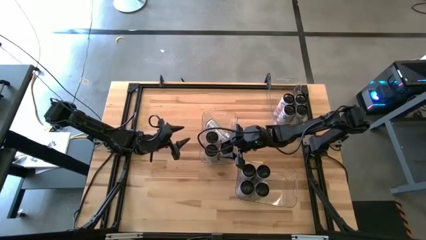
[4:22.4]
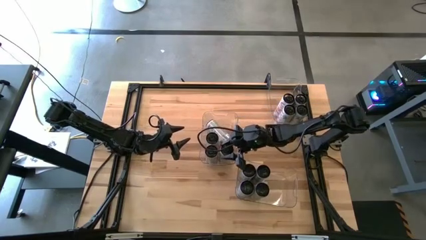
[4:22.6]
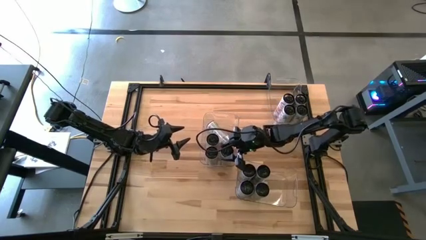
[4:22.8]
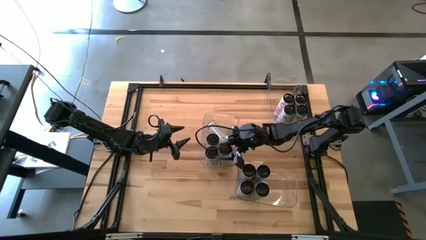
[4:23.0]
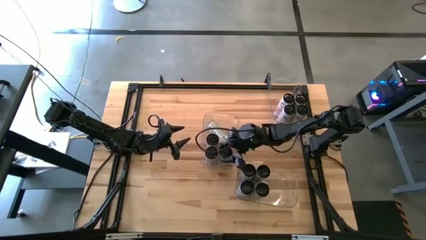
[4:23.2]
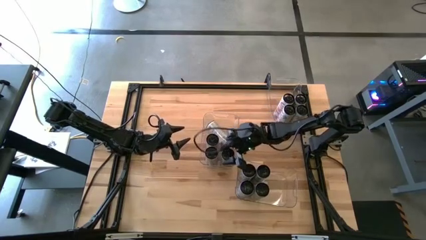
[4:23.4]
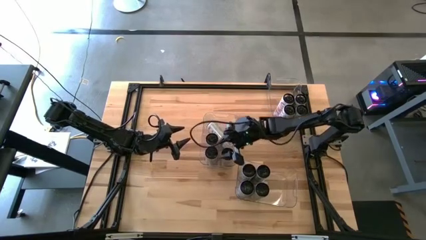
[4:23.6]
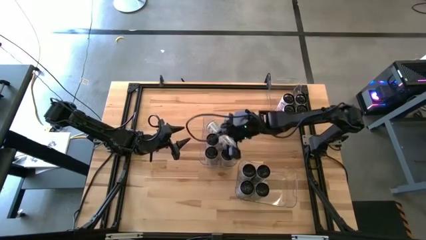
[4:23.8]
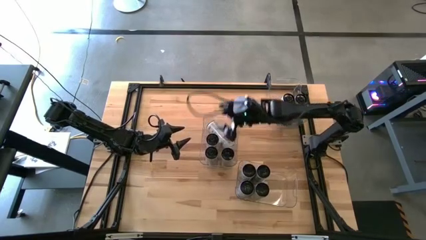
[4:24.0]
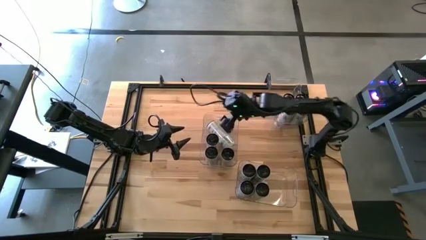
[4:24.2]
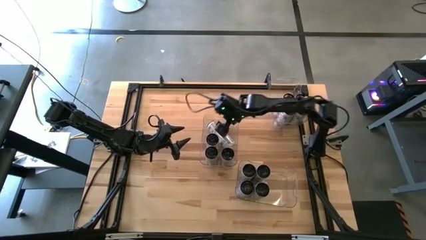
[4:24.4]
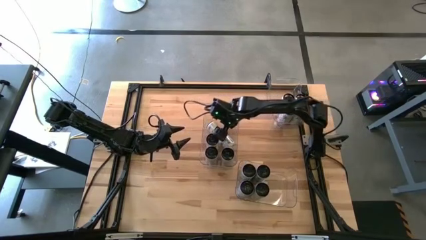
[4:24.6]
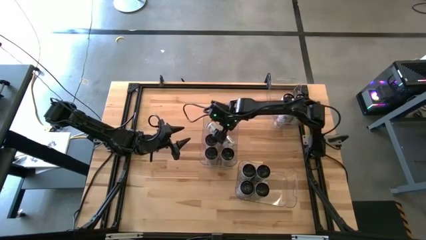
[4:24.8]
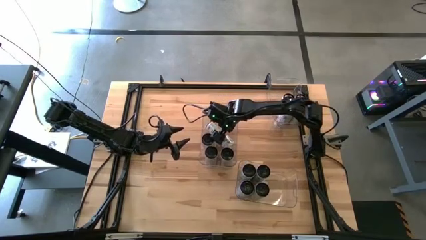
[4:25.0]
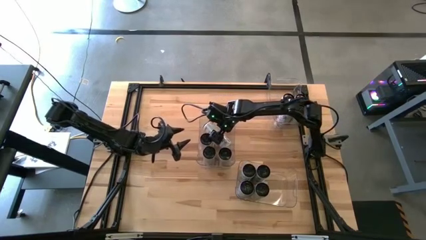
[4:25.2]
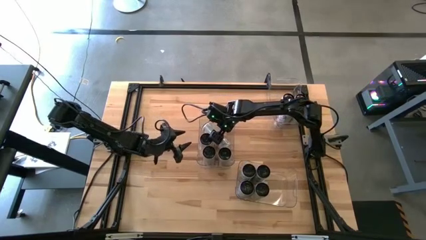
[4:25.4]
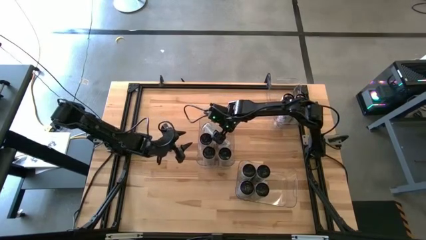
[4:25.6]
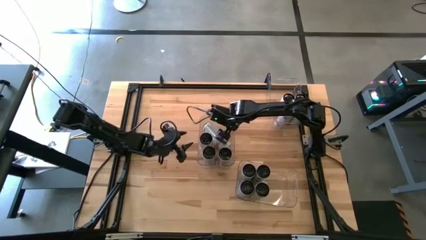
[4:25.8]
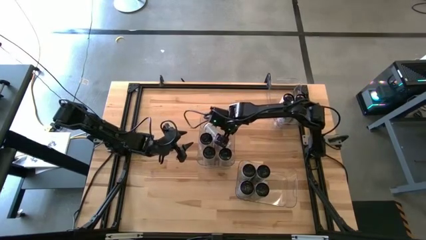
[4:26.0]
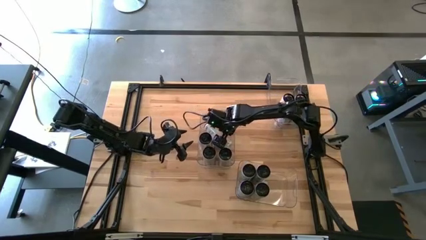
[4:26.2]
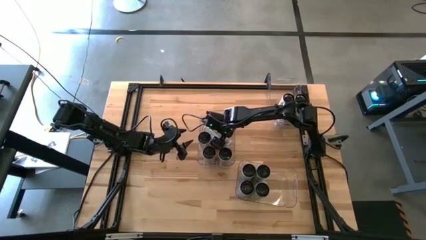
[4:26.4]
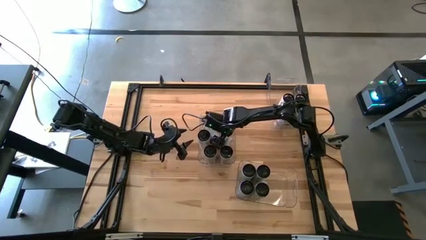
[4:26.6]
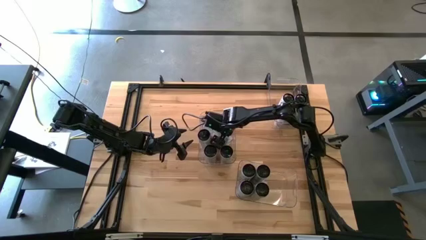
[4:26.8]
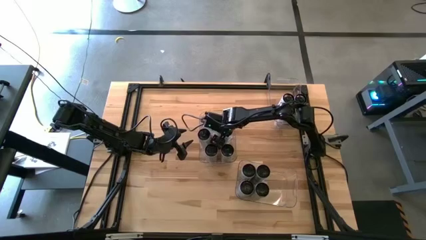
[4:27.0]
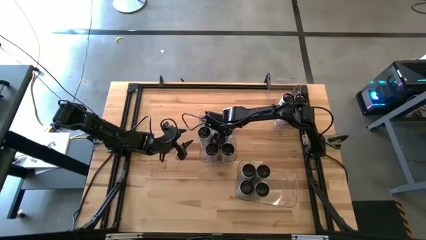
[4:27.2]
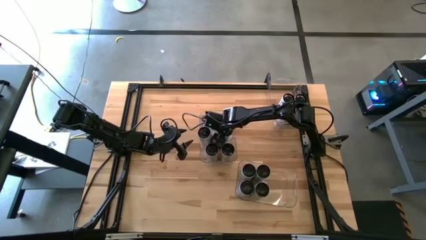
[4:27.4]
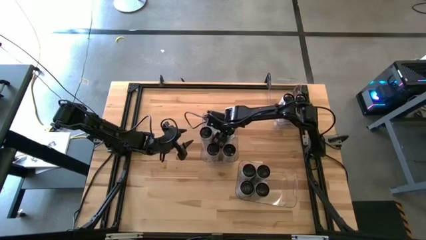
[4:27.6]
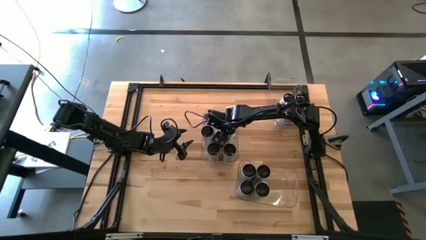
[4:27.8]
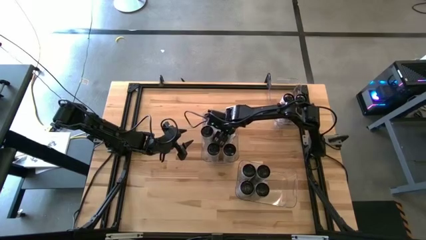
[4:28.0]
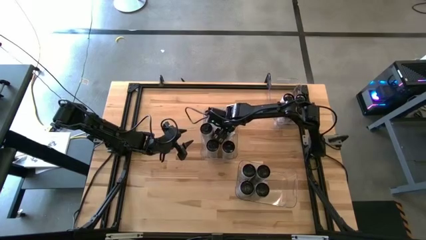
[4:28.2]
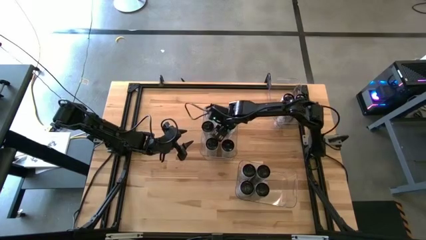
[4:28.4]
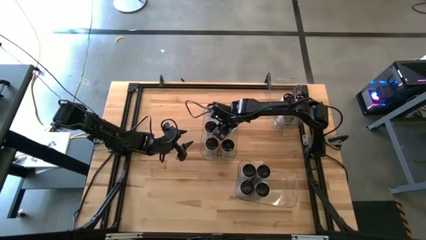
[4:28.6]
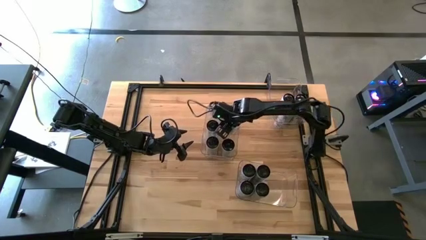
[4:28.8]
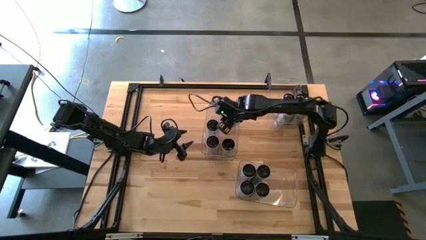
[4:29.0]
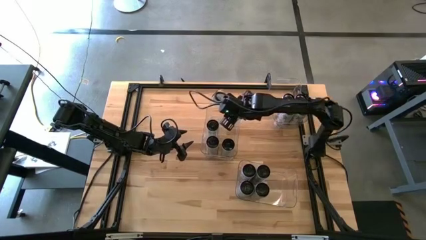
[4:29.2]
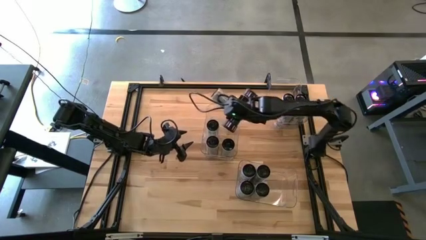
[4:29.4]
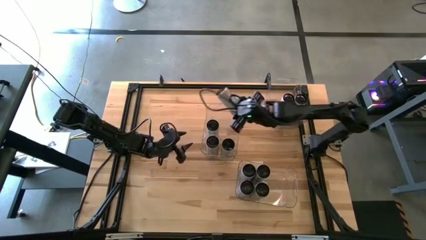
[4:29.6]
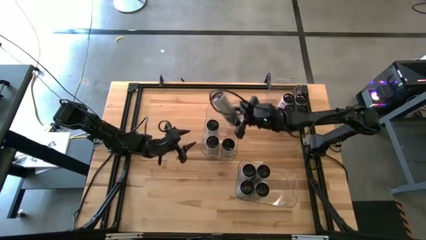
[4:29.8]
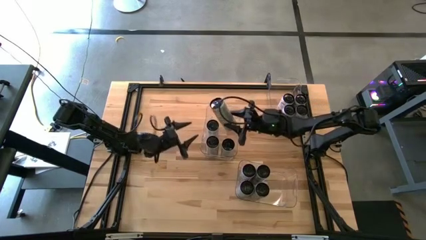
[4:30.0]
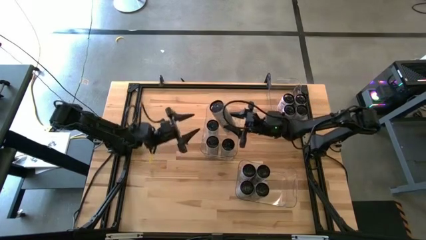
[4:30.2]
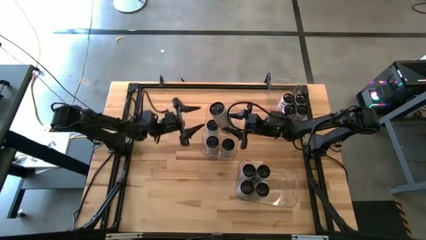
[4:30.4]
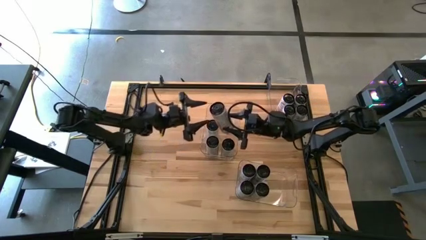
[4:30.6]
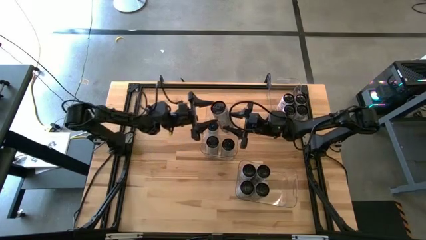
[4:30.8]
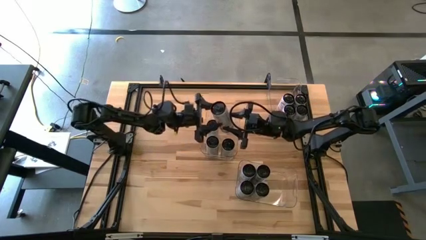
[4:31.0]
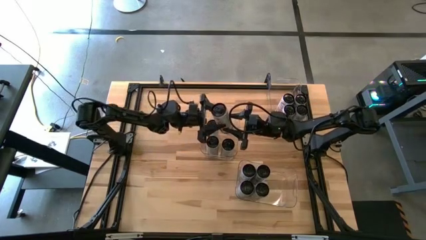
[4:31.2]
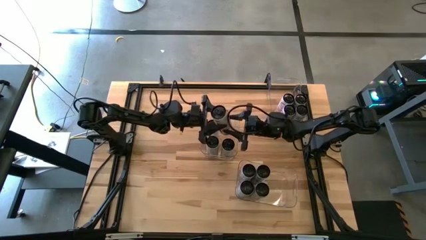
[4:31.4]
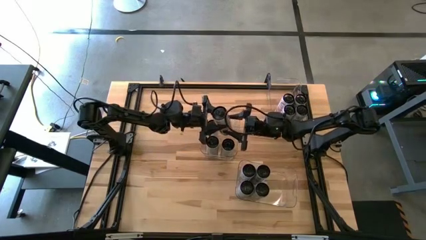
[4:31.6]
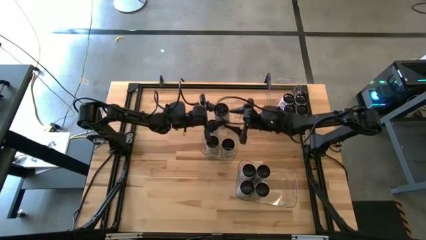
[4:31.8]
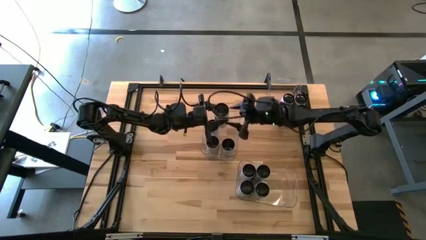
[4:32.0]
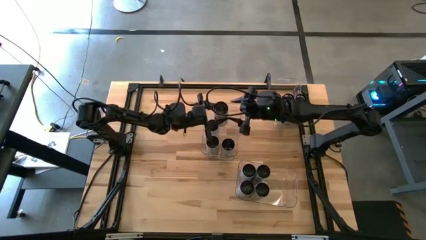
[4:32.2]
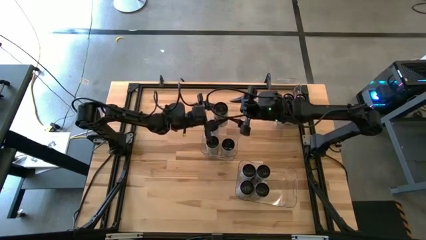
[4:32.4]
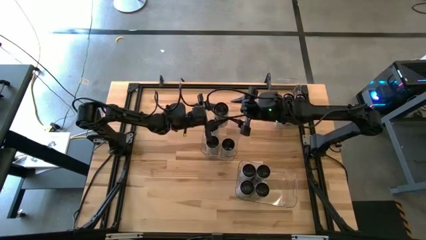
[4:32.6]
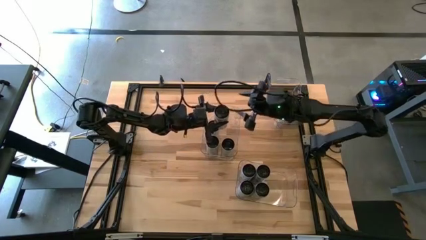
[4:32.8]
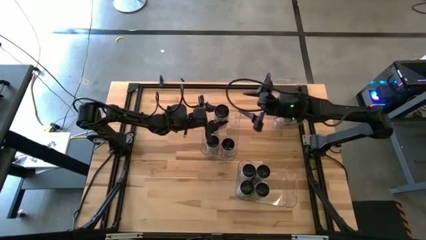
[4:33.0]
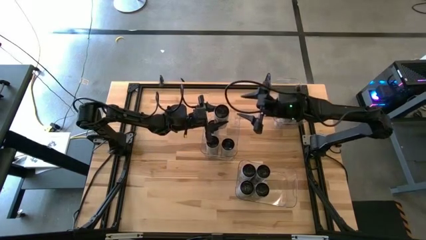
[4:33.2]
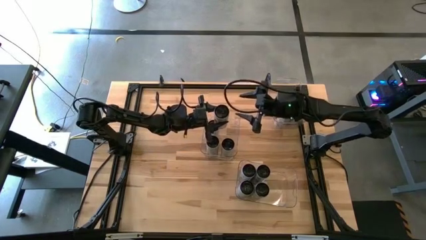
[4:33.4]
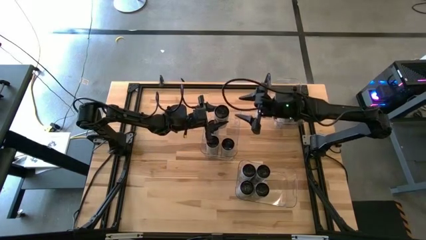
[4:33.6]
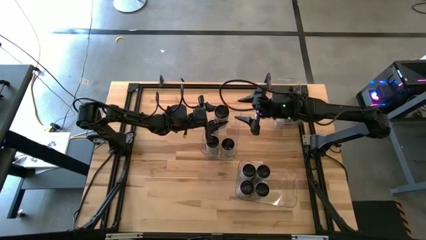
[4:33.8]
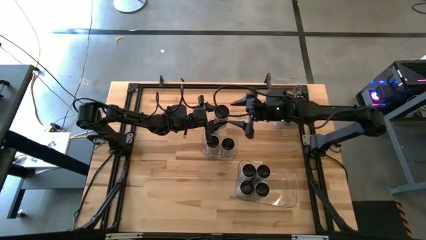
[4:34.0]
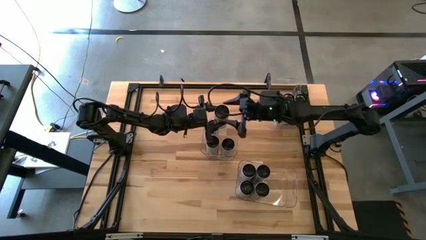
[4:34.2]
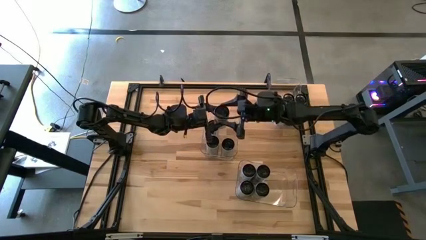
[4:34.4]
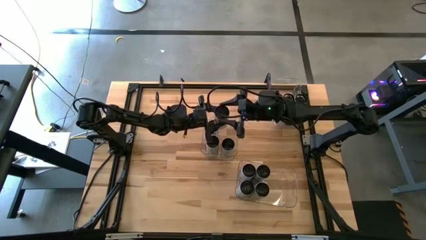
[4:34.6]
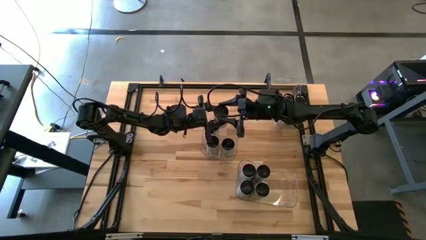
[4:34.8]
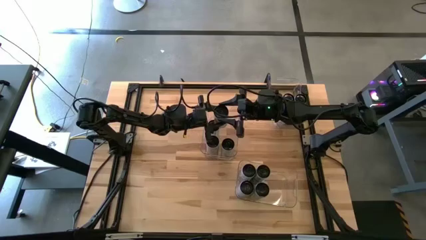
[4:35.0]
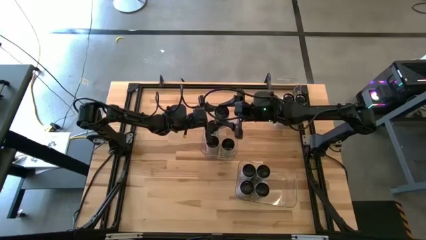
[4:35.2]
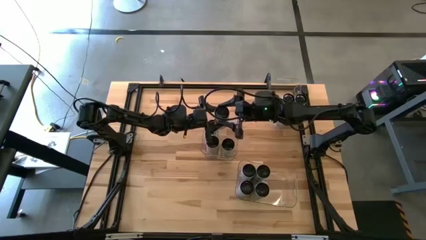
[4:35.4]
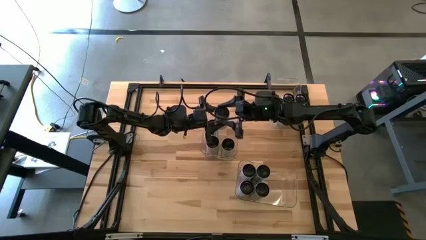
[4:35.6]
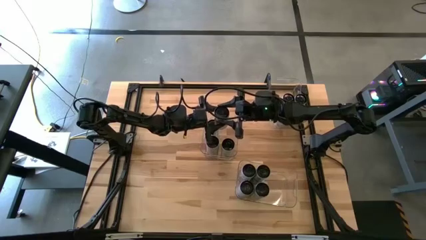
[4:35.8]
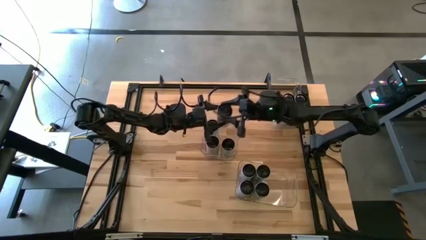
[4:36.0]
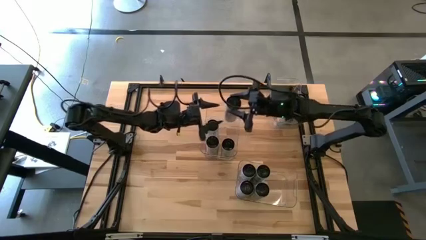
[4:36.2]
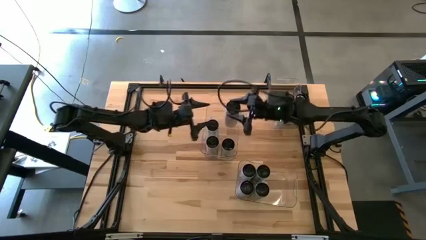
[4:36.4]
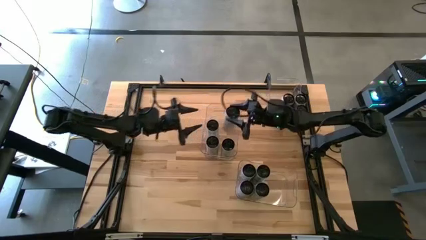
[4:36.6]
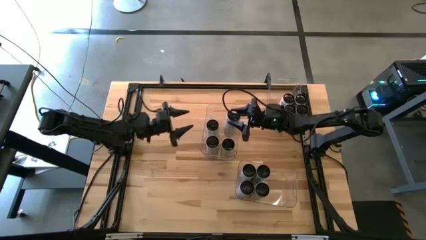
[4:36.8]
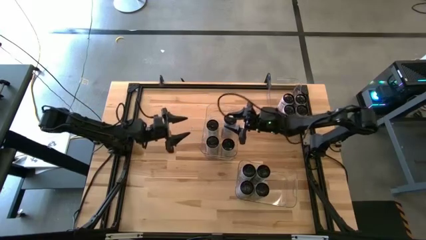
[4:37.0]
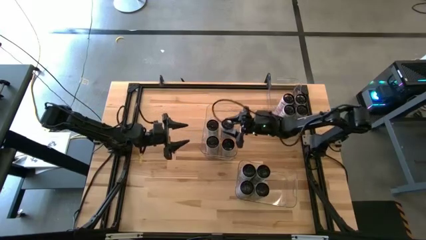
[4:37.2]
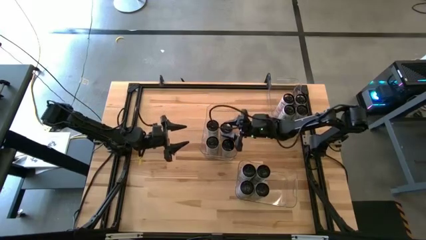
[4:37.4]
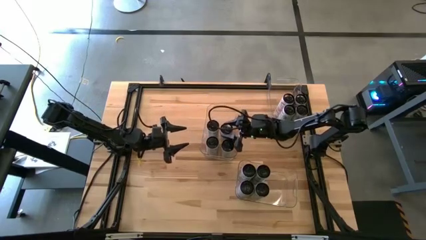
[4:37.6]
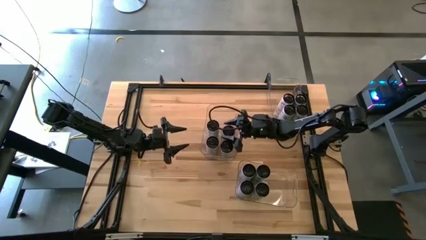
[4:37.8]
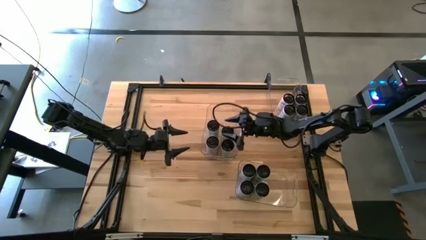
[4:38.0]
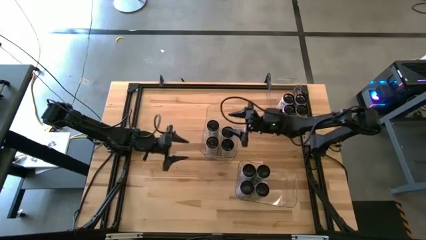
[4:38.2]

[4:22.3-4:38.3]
Task: Sort soda cans
Adjust the white/yellow soda cans
